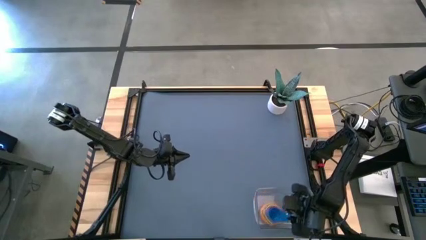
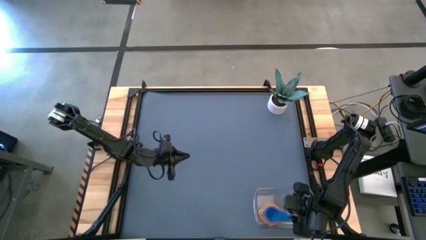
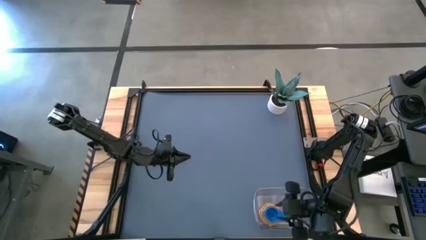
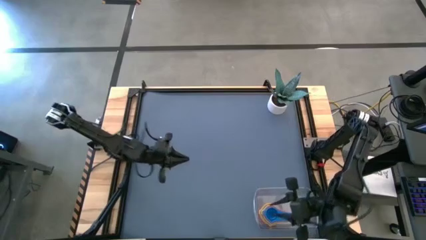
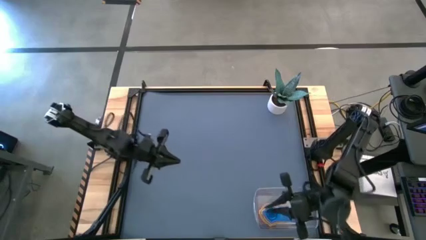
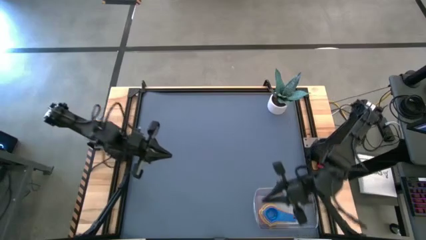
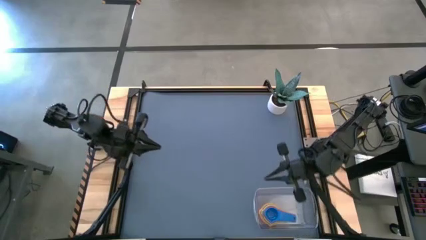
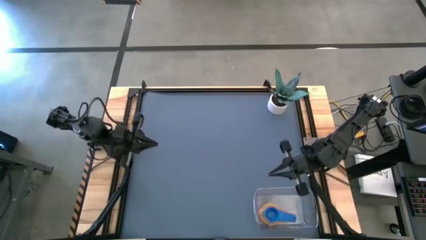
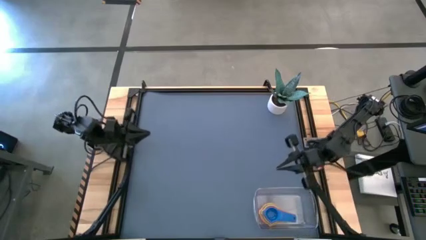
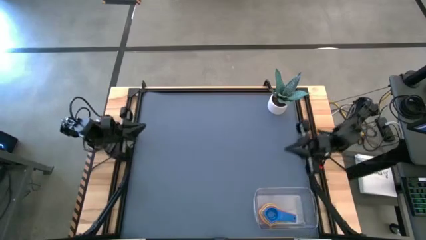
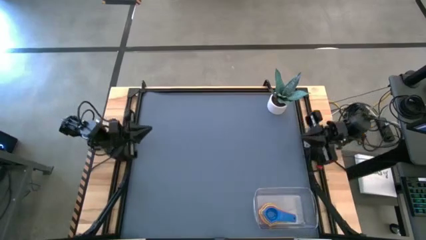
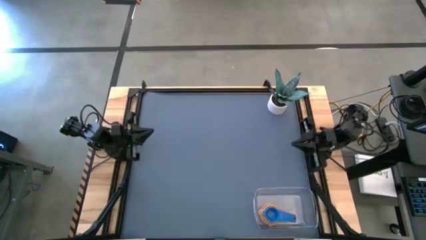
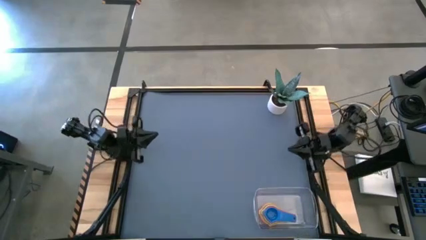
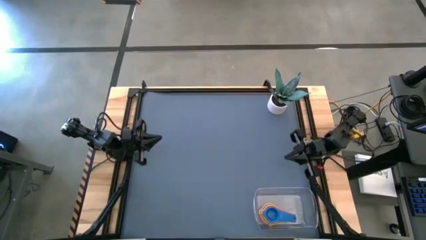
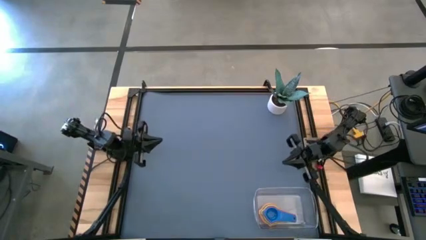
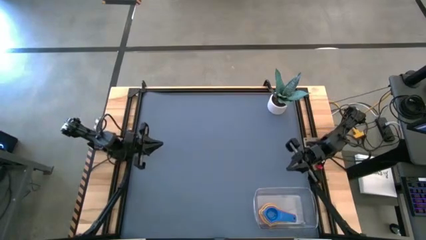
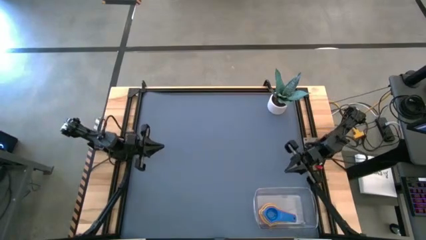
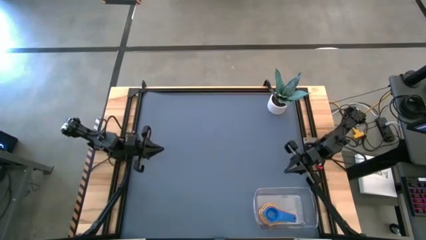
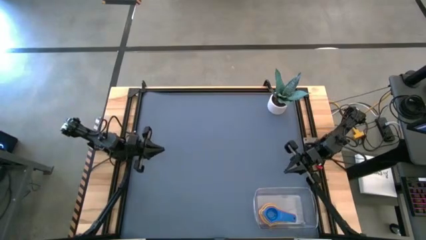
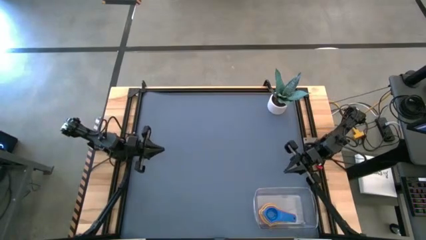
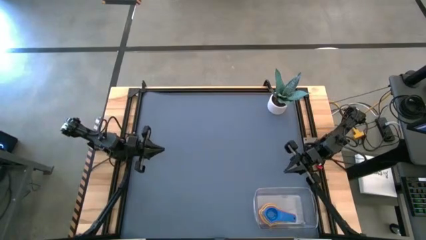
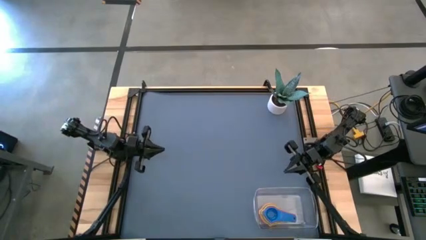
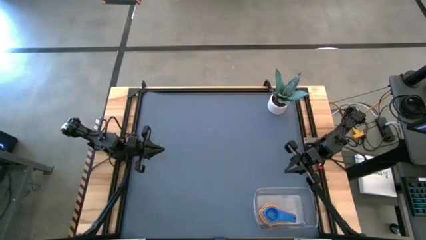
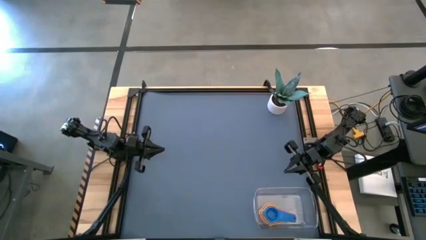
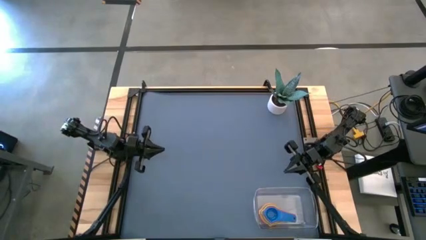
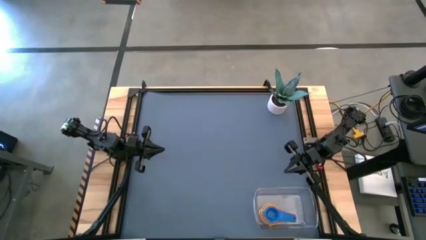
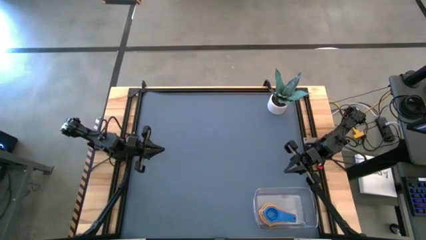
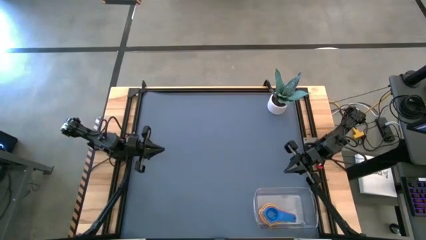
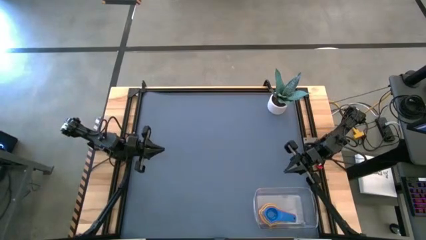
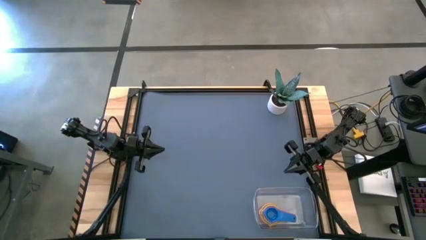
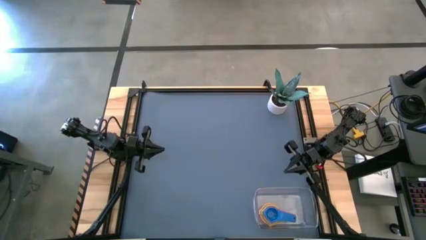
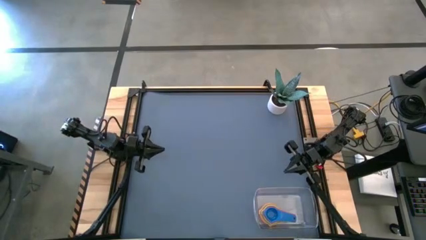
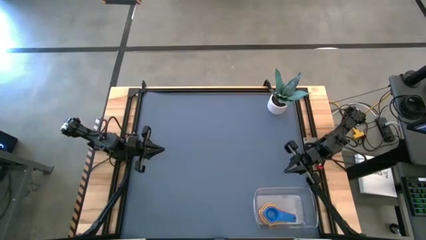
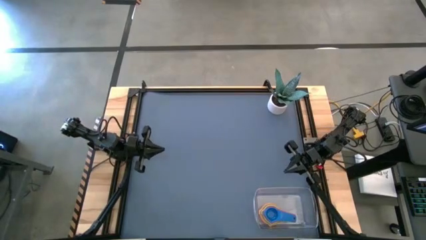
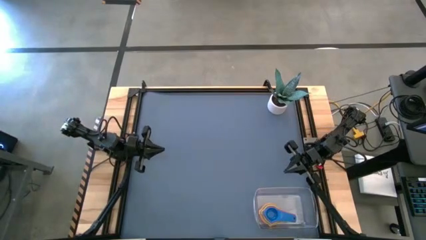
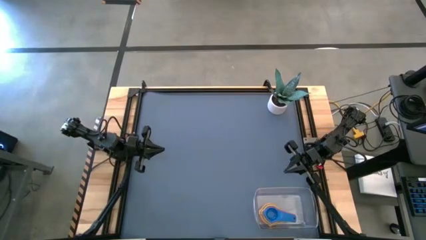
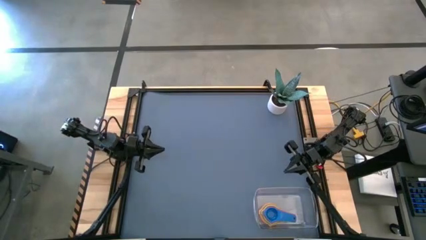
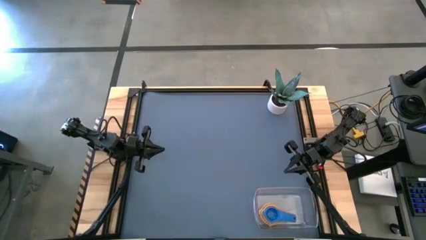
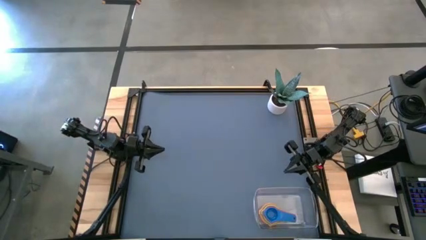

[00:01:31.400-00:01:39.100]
Task: Nest measuring cups in basket
Return to Home Position

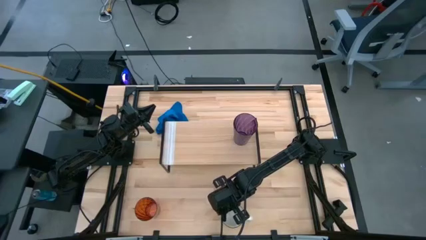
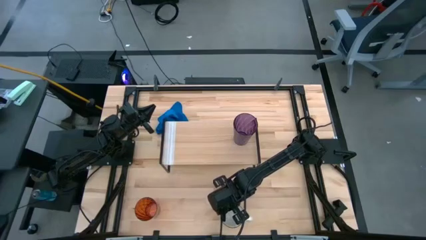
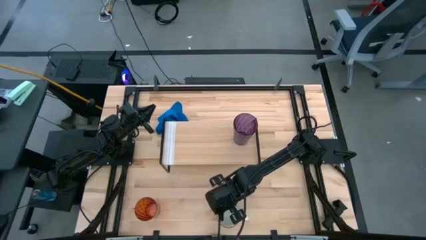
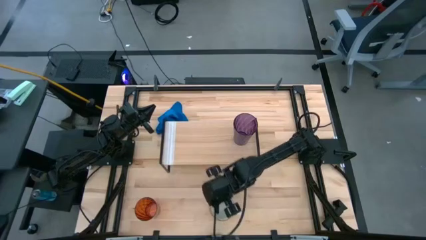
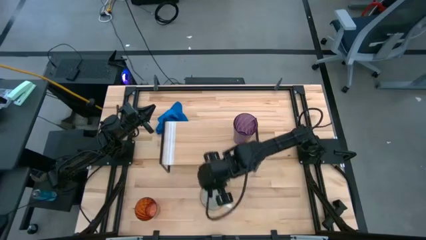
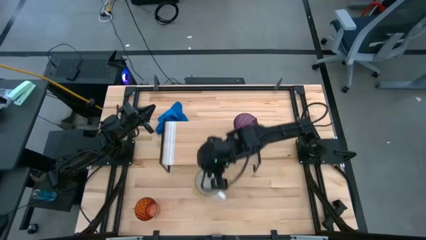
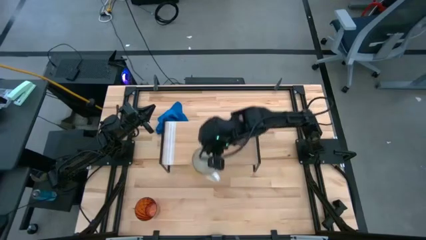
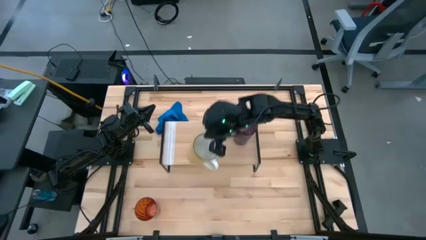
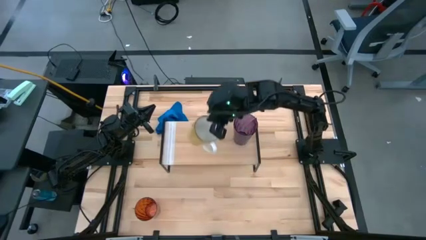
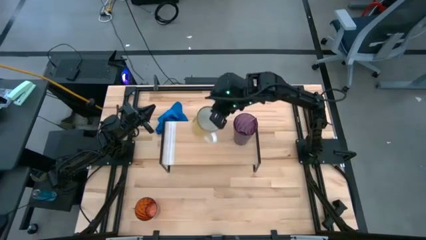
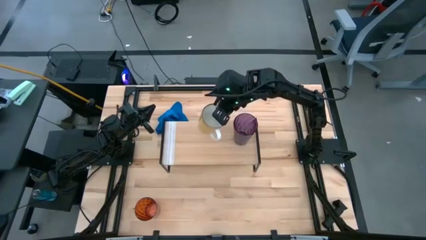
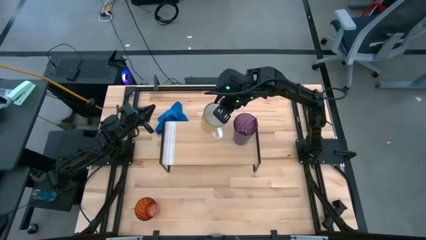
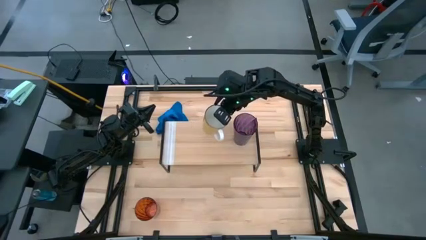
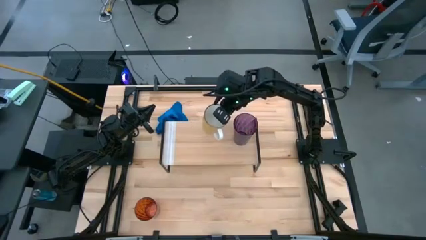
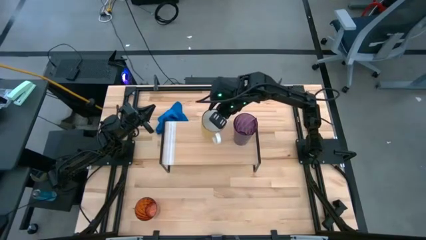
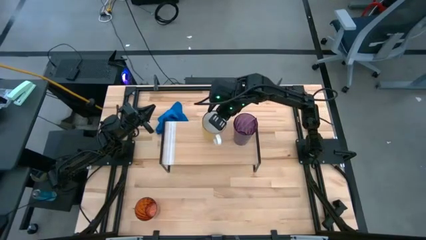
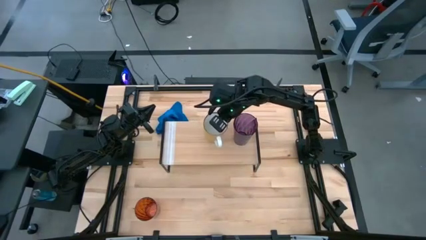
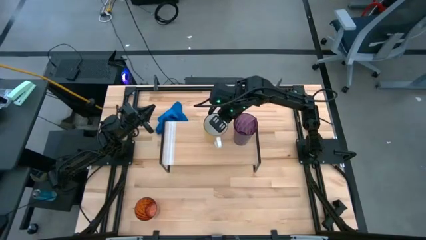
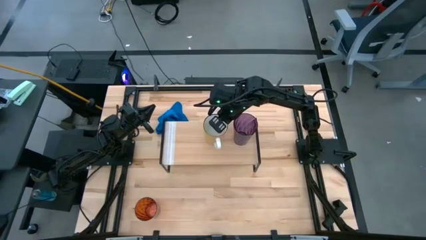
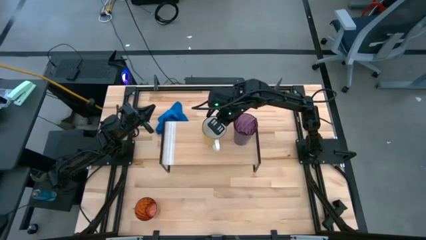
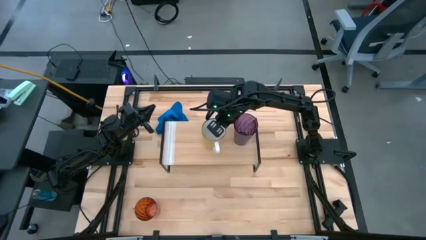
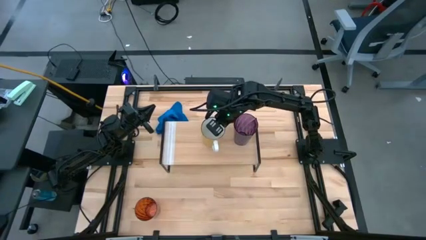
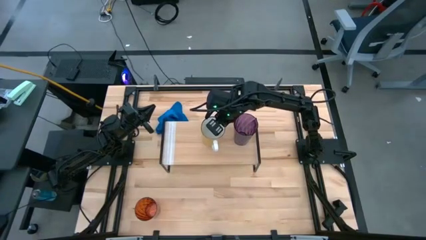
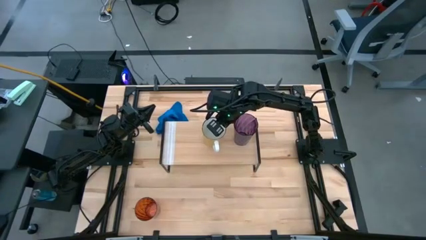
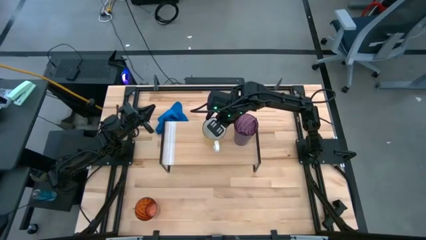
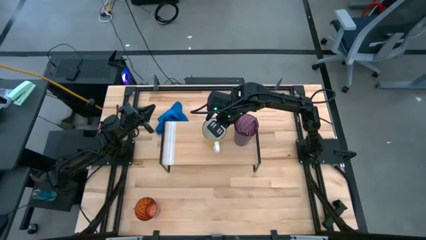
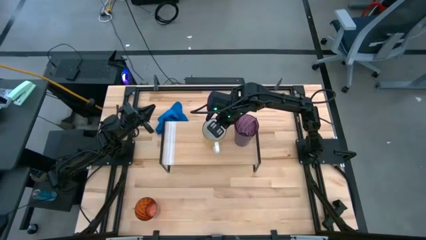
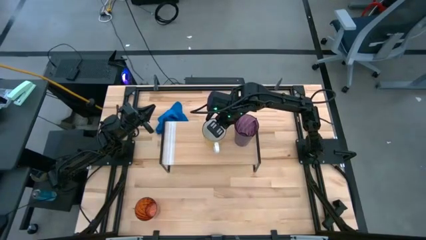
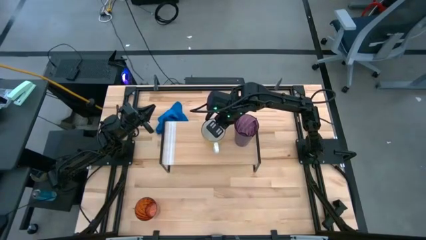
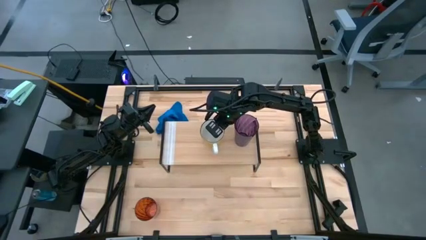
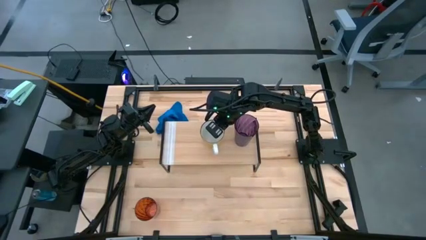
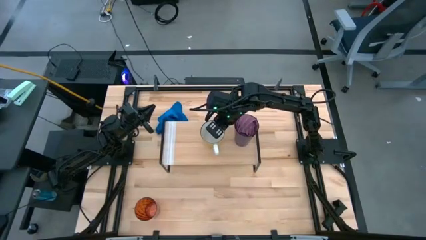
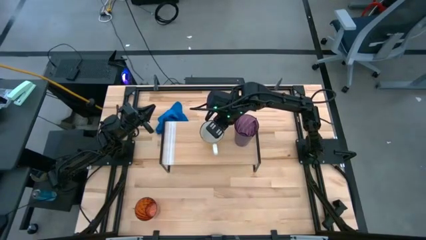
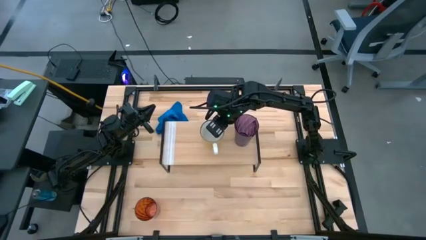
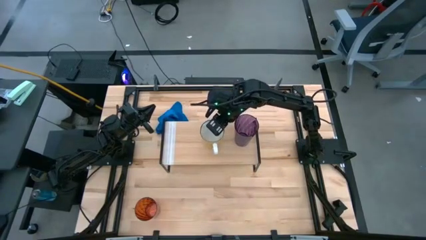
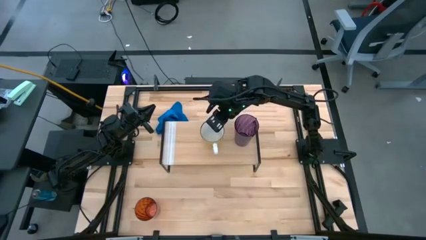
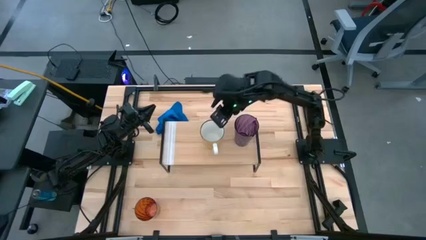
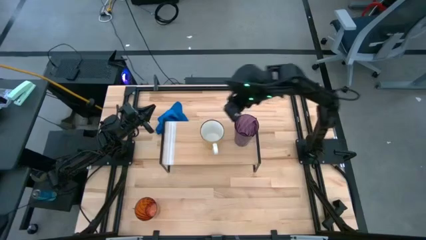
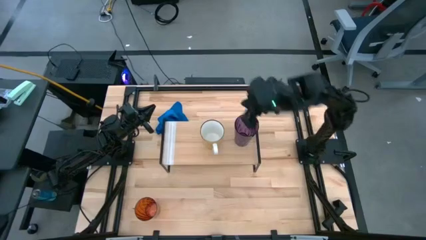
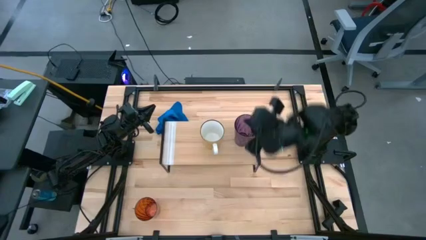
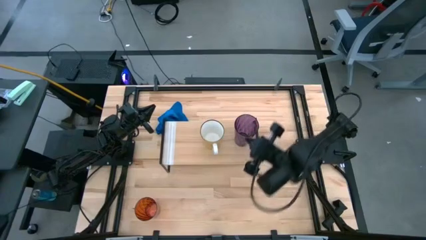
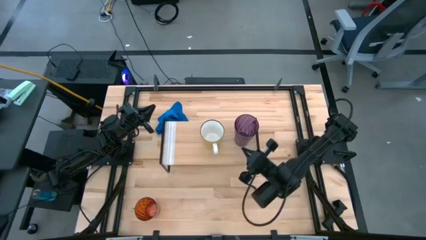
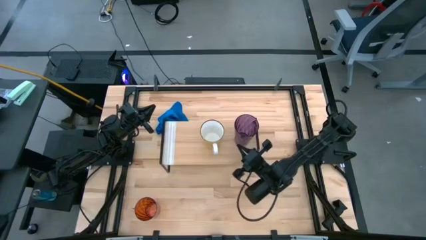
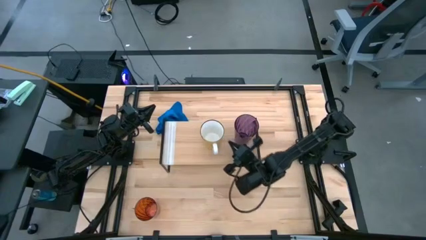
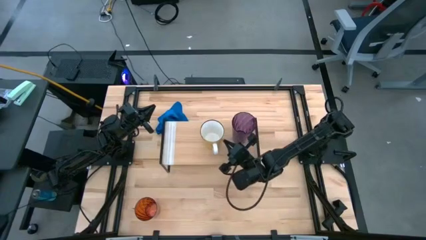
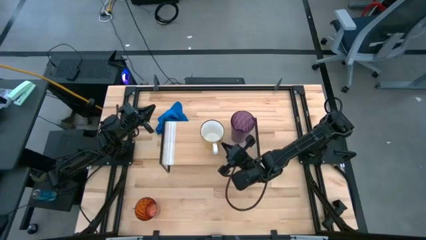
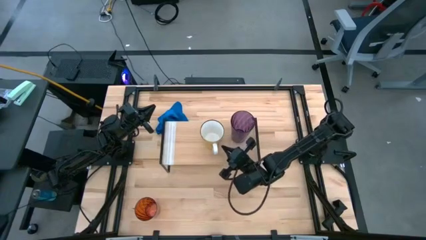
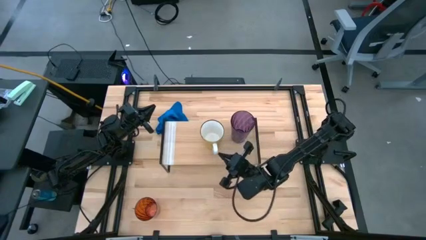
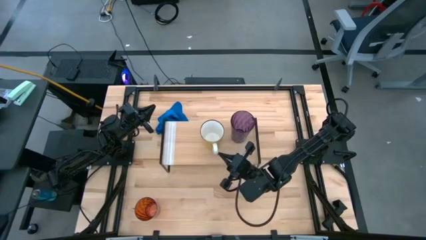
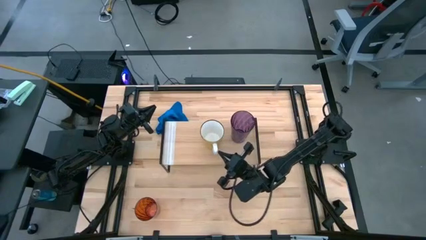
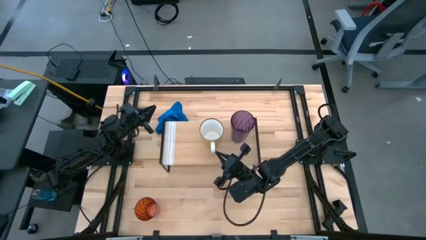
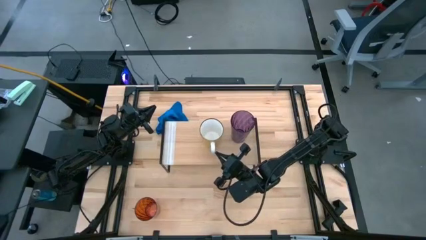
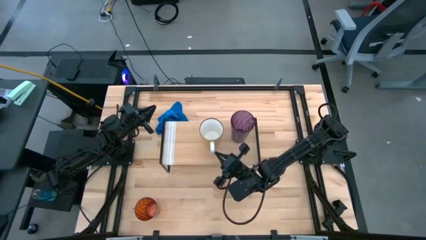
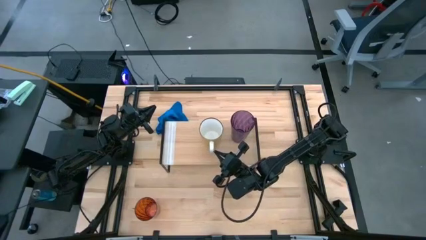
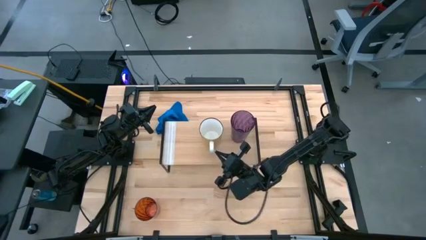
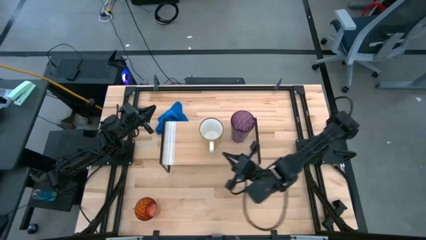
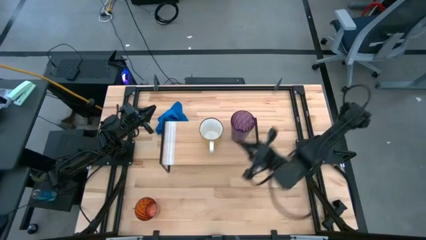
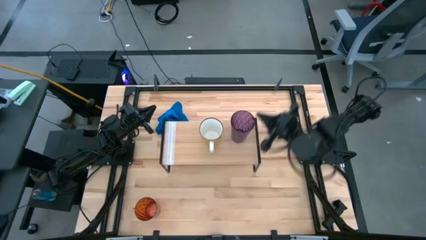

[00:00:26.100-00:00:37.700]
Task: Stack small to large cups/mugs on shelf
Put the yellow cup on the shelf
